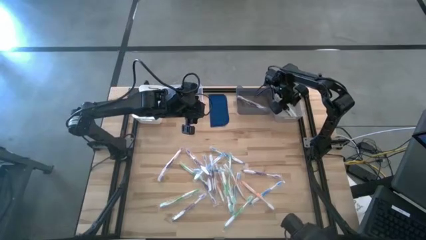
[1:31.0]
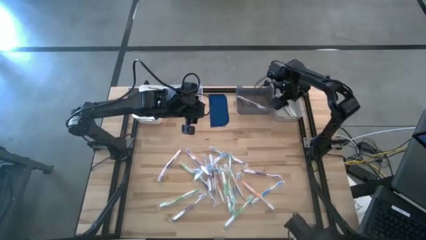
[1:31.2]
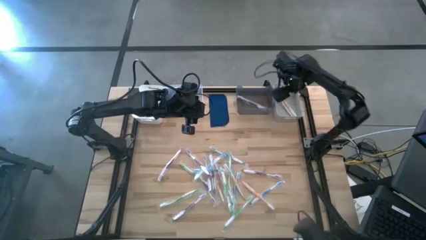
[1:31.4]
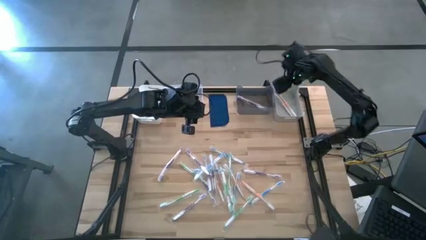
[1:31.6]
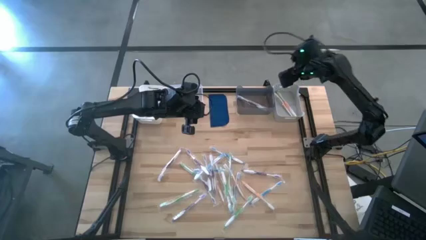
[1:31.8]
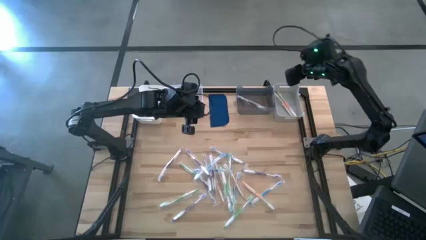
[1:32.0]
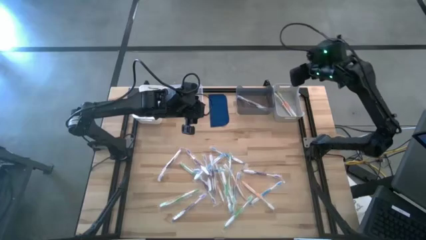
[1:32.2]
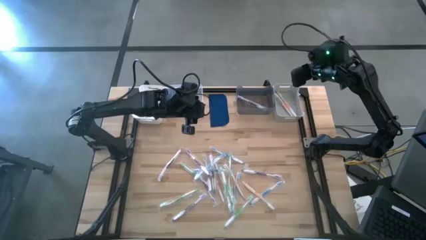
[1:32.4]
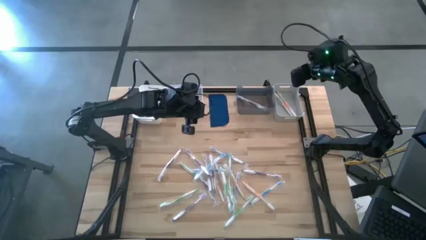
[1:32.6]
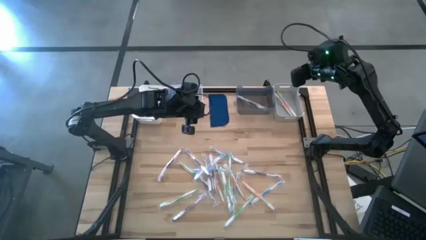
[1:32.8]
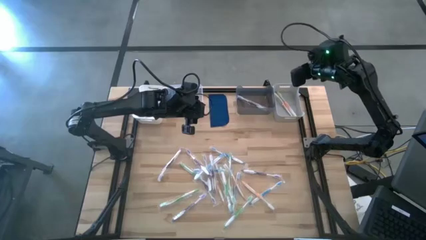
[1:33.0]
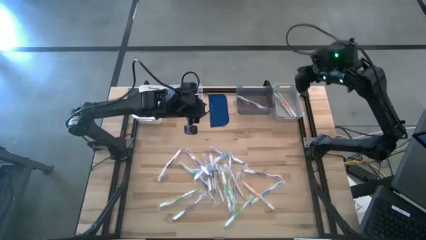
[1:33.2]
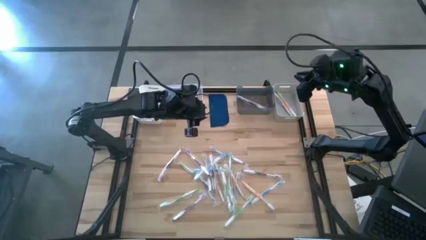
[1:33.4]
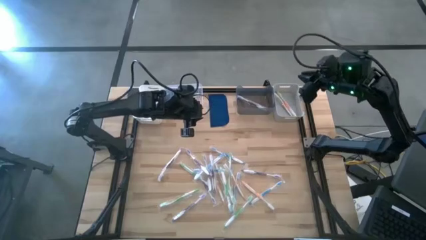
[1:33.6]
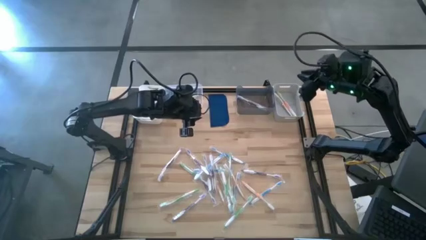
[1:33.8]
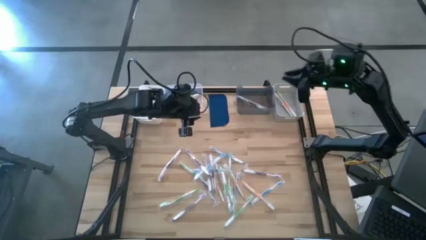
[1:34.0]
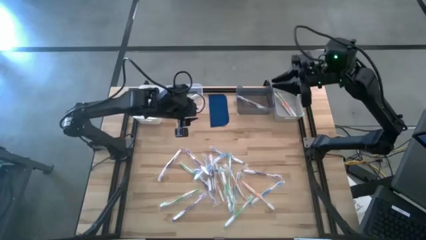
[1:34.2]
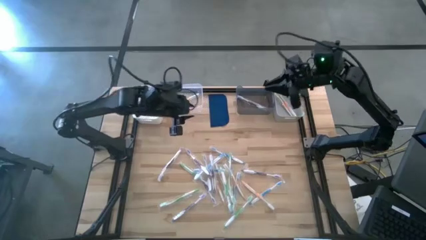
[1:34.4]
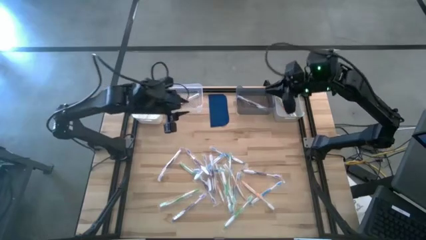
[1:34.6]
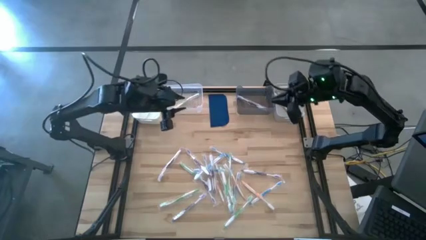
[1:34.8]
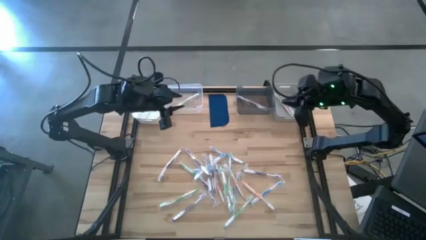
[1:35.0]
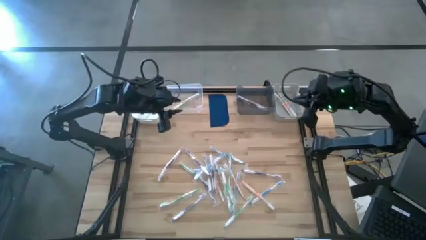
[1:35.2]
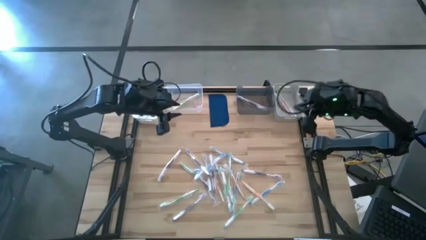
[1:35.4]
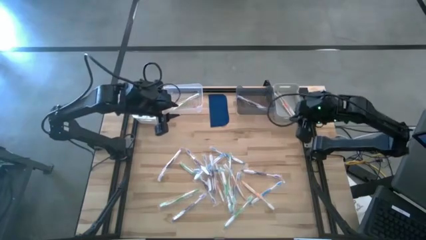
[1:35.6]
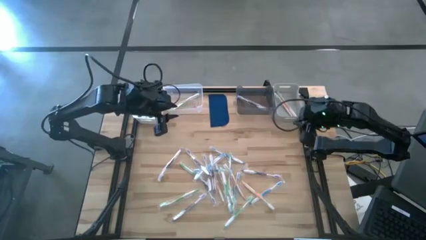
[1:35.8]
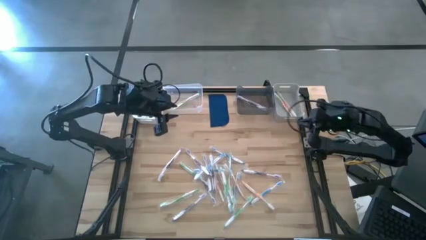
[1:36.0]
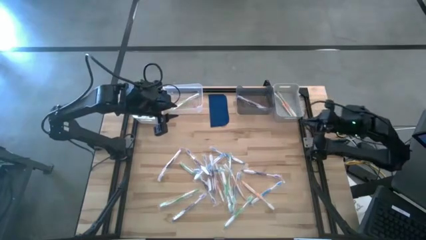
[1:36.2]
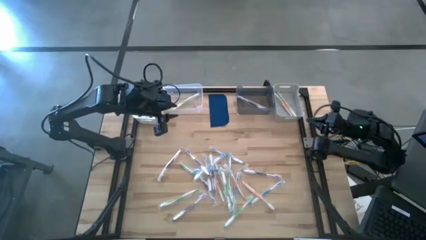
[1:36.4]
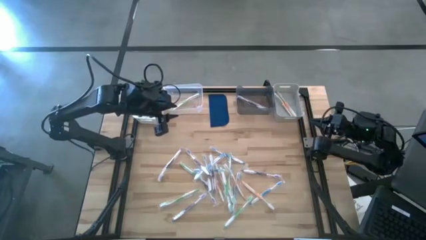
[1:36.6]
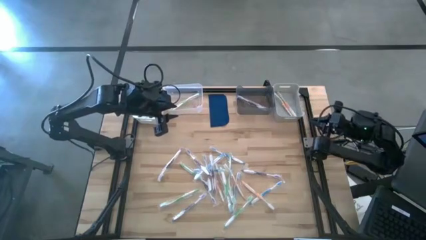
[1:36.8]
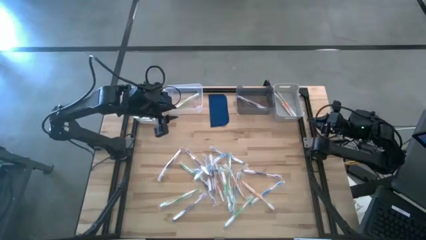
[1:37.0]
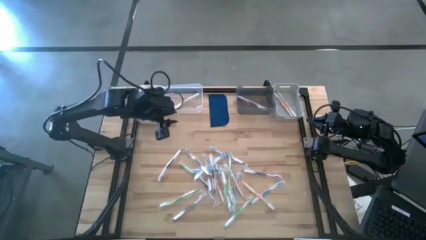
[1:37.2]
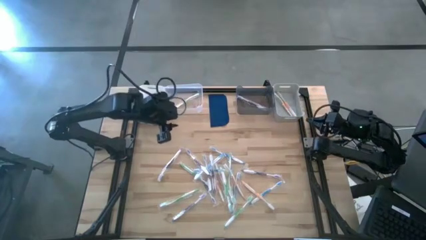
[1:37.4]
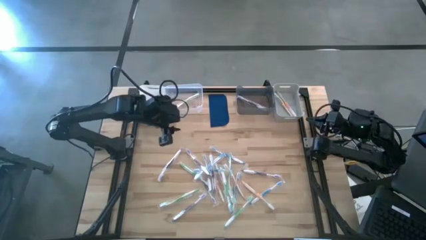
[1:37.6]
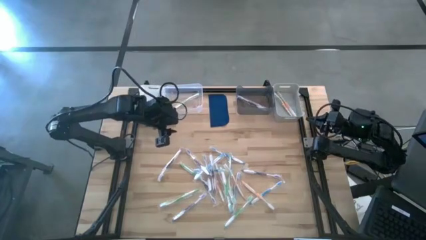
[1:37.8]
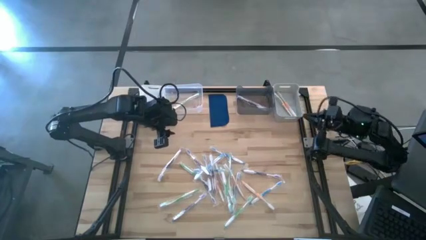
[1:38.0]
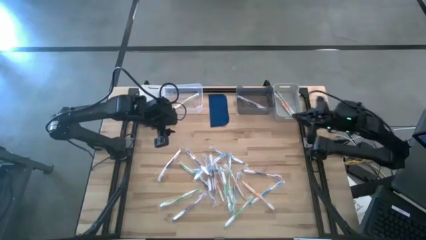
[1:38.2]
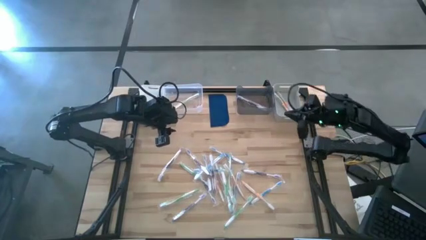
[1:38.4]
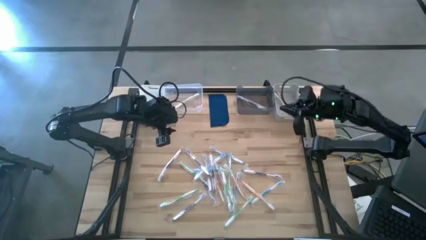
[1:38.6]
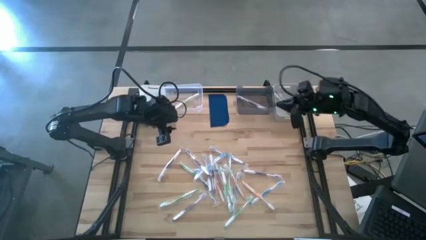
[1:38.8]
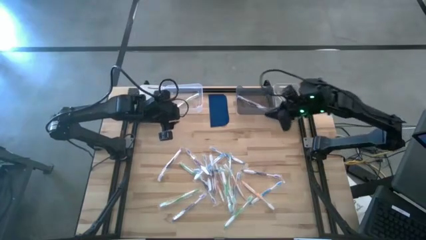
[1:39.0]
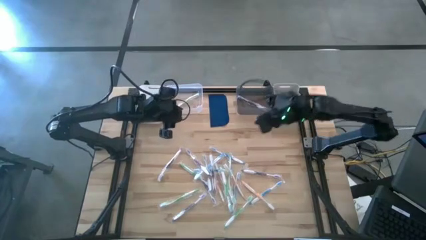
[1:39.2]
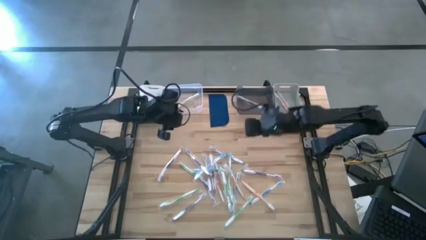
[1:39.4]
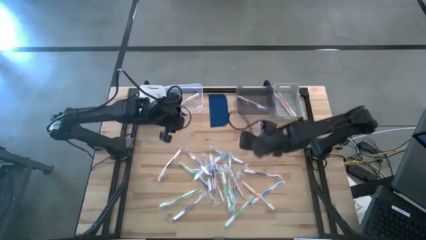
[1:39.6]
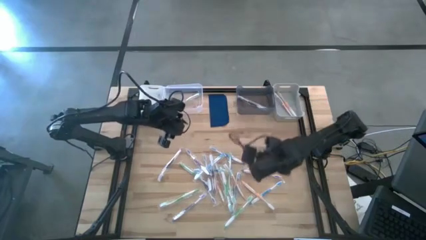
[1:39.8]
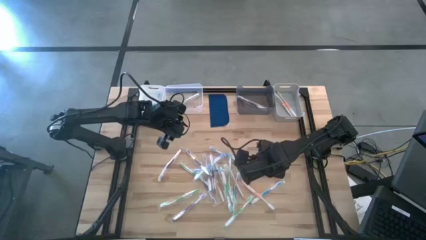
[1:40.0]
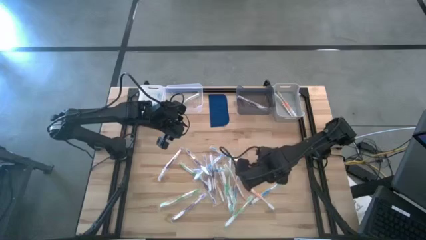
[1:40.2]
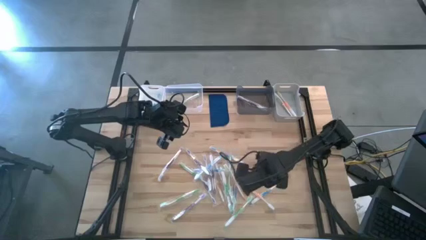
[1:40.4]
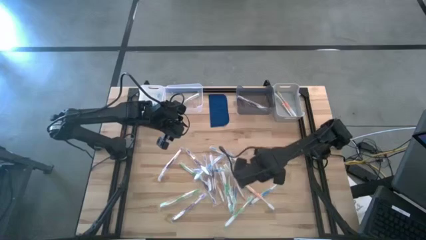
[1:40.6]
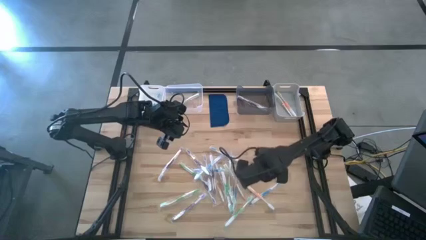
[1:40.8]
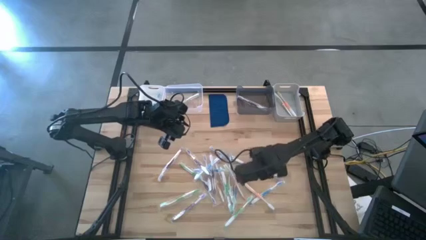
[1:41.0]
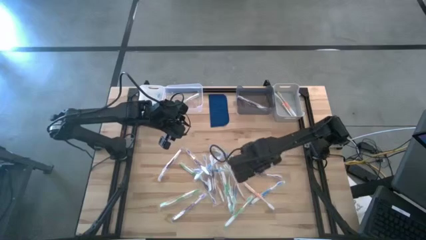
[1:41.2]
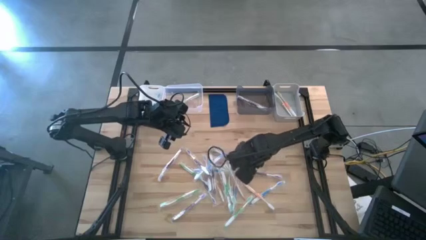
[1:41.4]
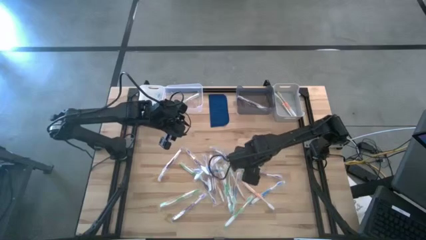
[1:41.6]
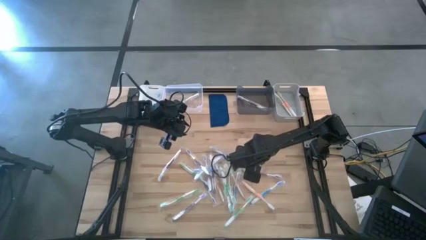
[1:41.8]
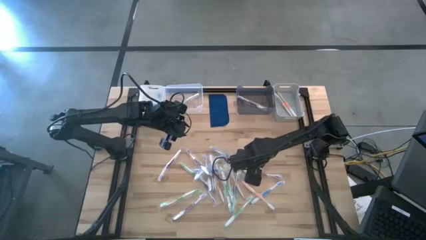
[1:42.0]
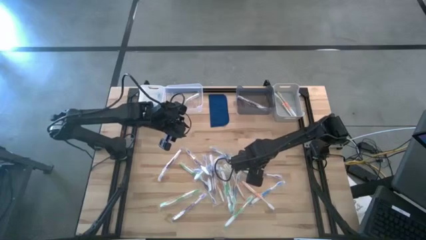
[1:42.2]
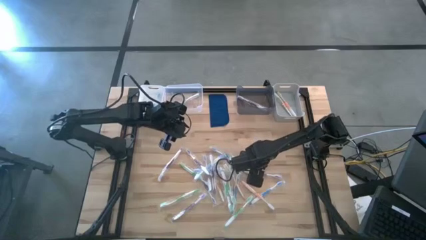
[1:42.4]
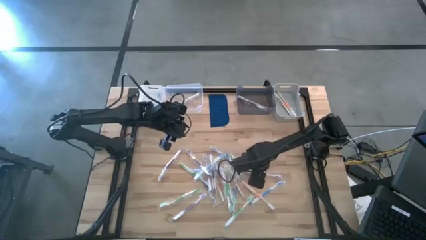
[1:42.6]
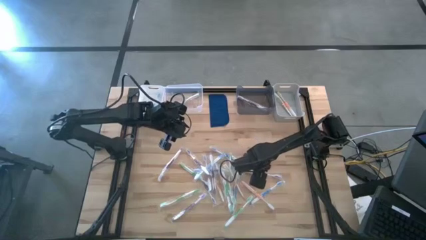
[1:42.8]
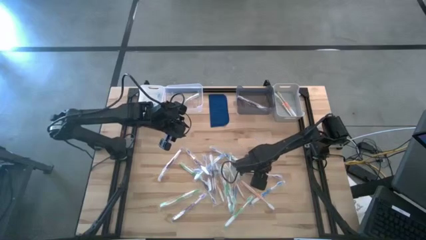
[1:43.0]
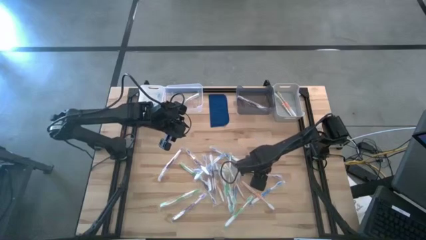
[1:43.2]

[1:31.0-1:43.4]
Task: Pick & Place Toothbrushes
Put the purple toothbrush into the black bin

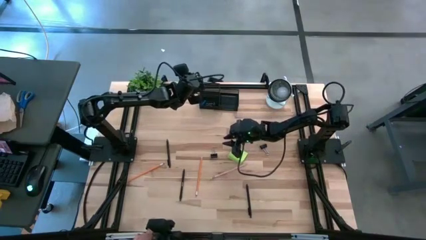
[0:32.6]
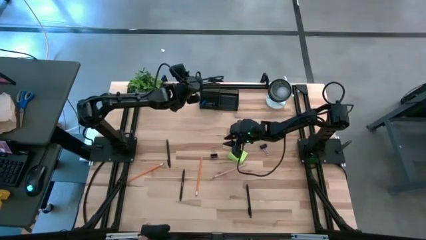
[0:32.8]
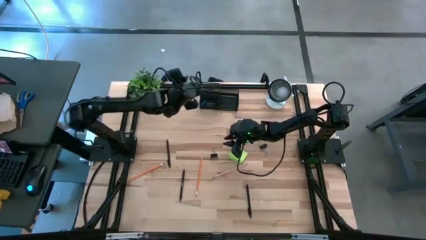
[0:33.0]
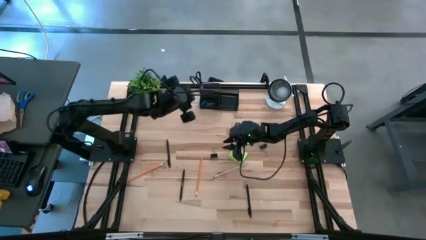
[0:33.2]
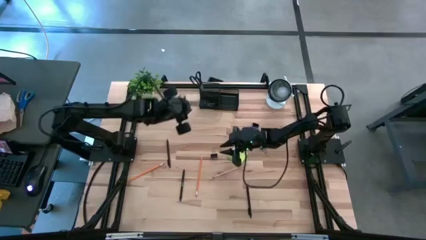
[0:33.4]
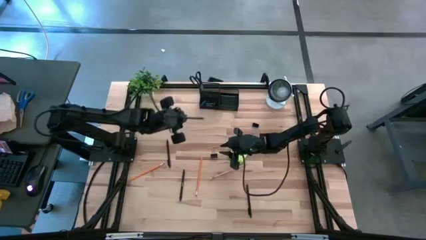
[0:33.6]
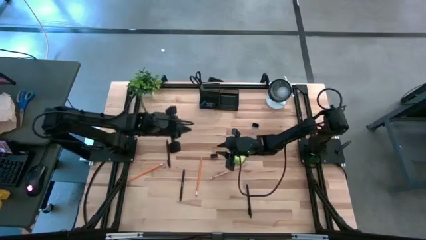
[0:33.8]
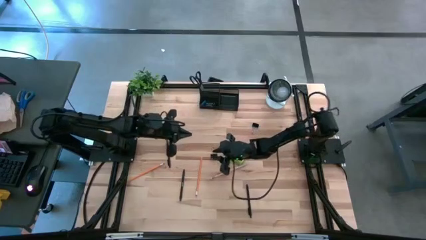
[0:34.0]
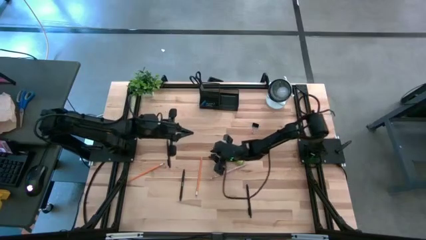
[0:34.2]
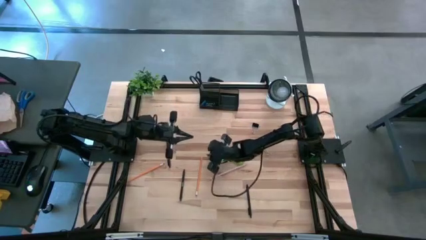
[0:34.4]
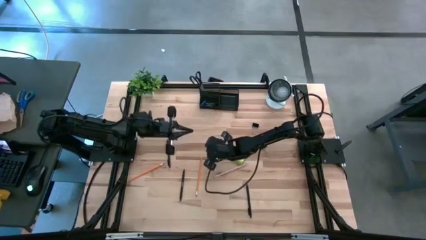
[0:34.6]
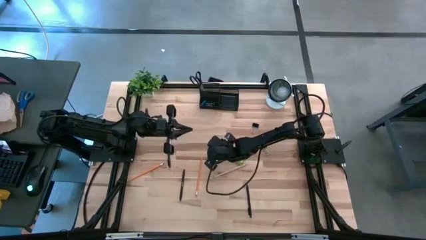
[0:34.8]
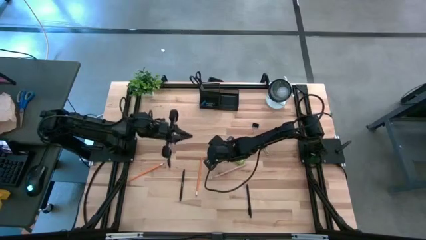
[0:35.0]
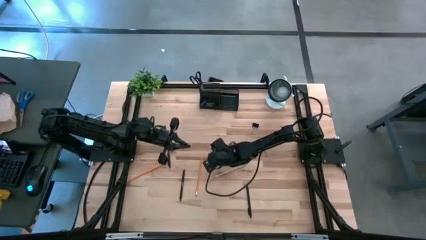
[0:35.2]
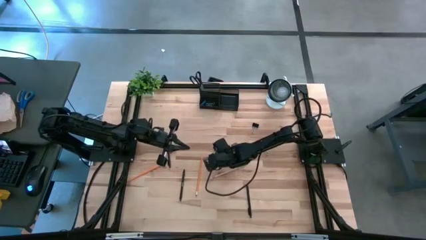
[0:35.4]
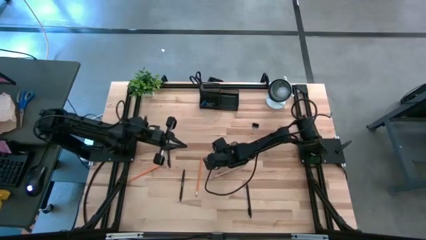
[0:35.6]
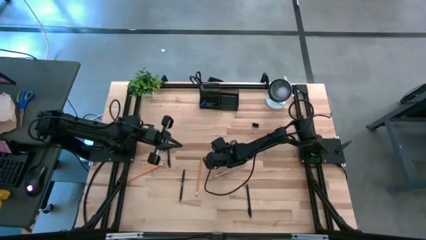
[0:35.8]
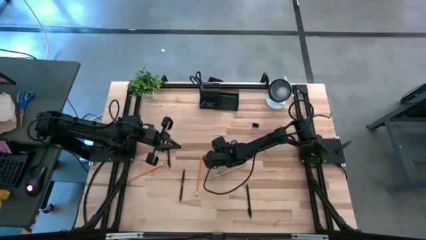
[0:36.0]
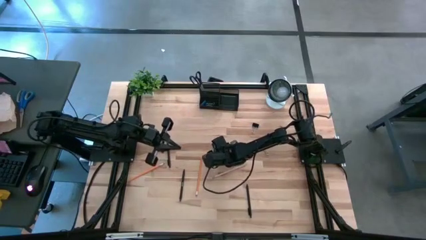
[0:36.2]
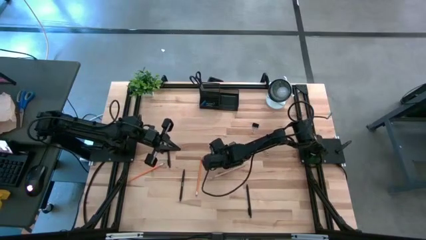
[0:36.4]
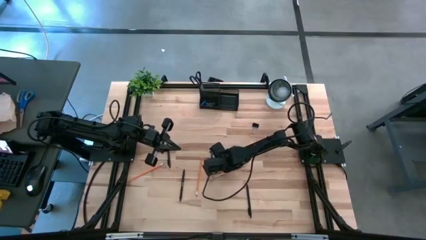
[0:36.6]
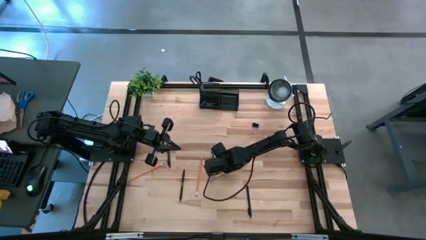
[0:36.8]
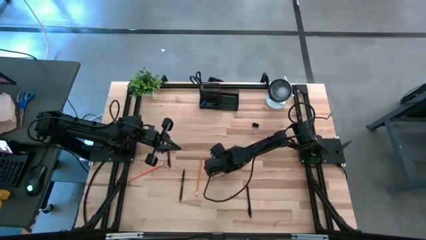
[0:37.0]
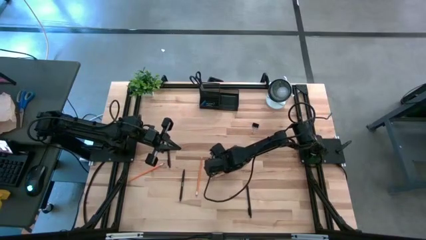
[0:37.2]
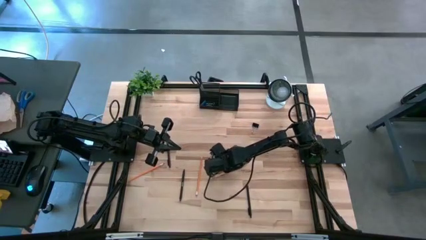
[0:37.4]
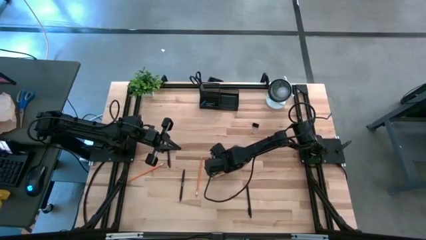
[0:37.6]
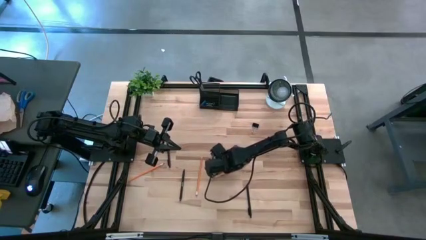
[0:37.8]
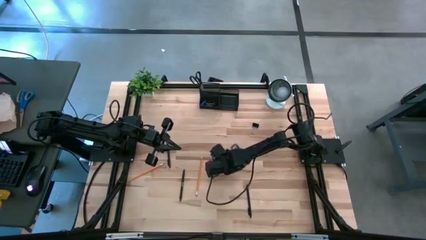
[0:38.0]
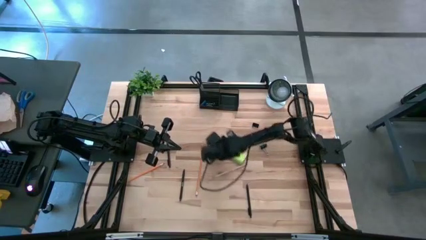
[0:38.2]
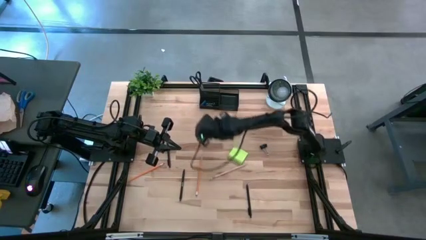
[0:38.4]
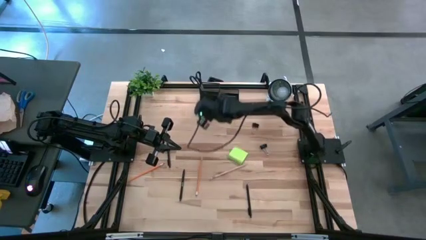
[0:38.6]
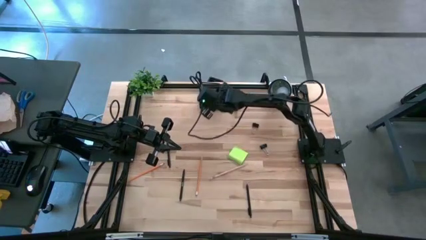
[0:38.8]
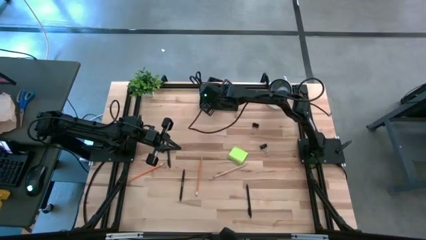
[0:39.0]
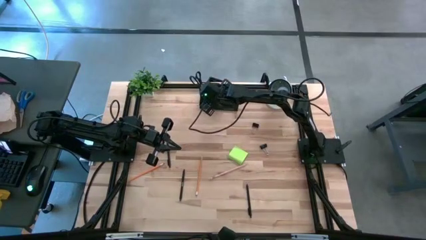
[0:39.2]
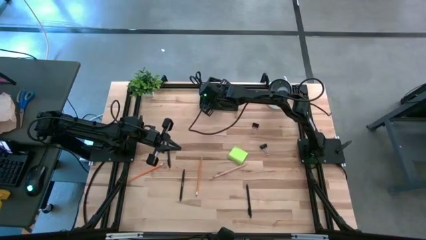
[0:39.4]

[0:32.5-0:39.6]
Task: Pick and place office supplies into organizer
Put the black binder clip into the black desk organizer
